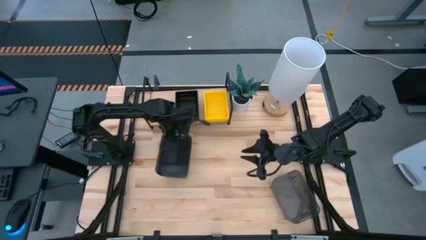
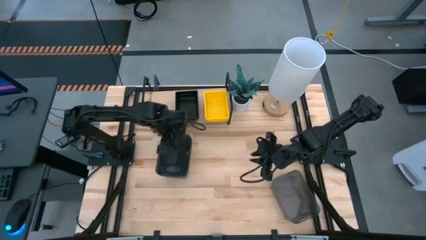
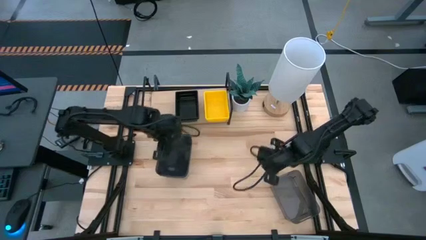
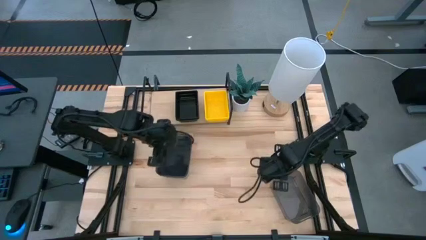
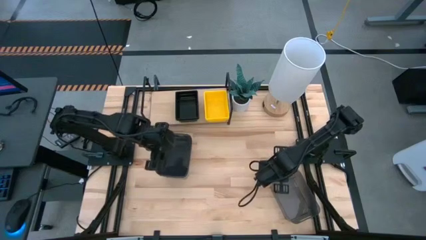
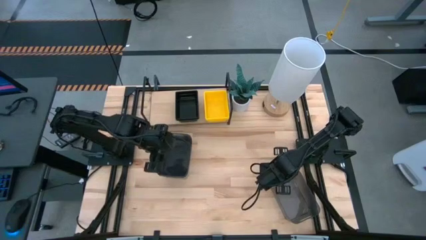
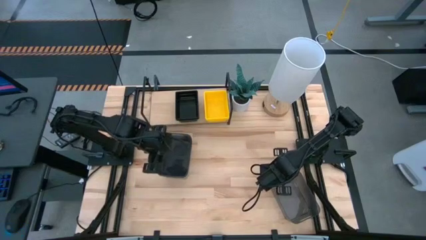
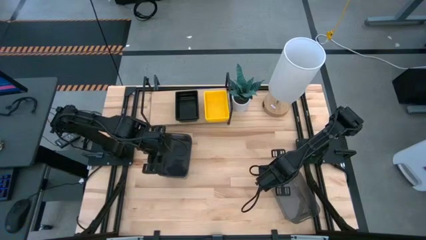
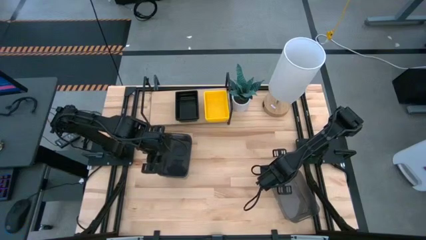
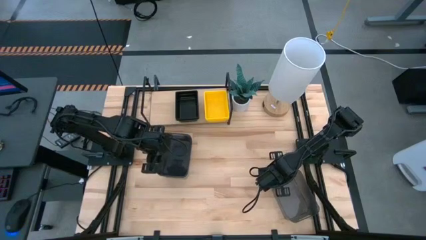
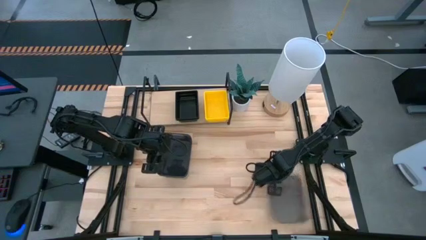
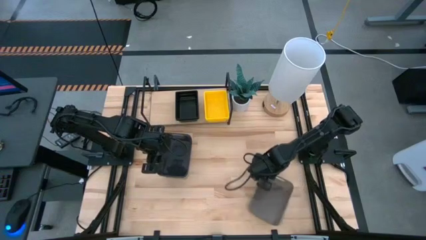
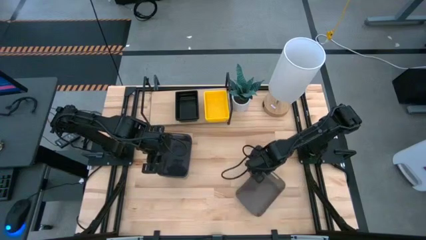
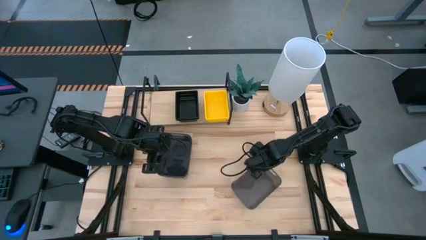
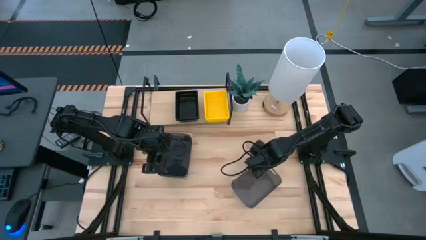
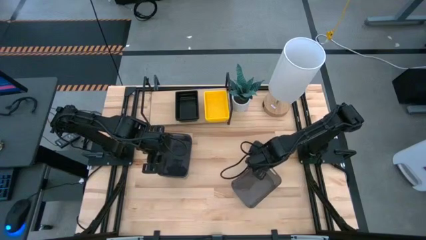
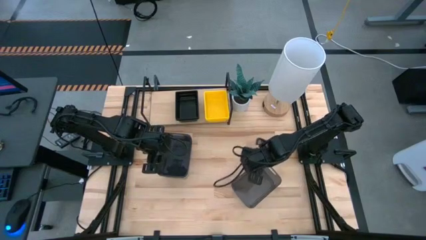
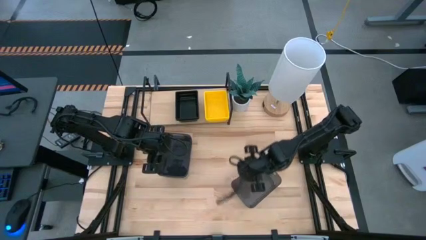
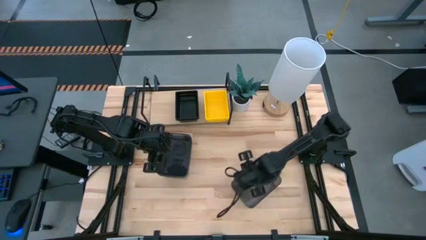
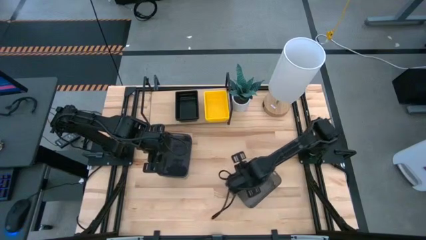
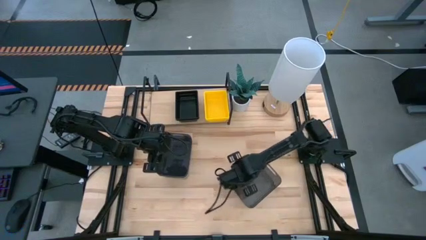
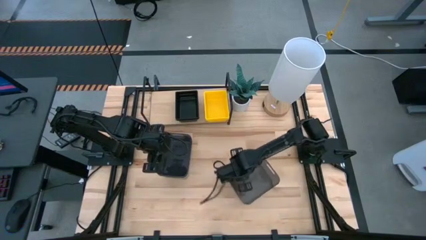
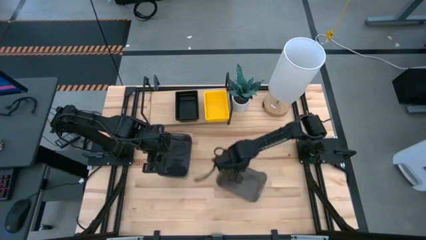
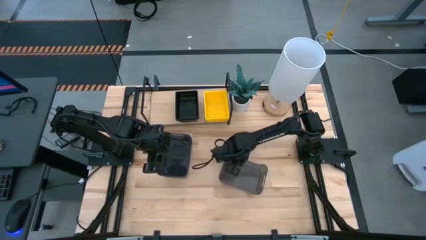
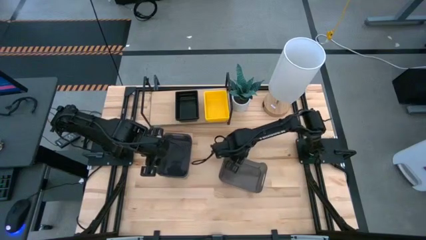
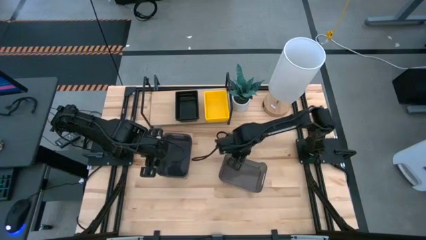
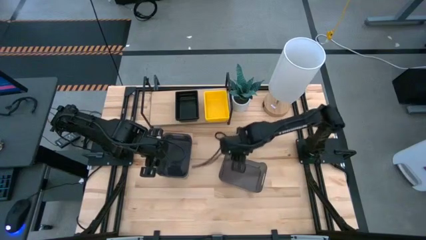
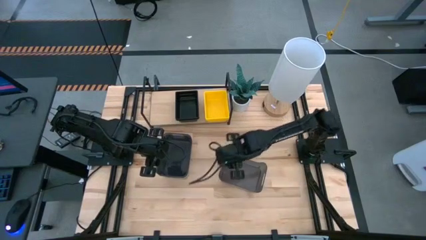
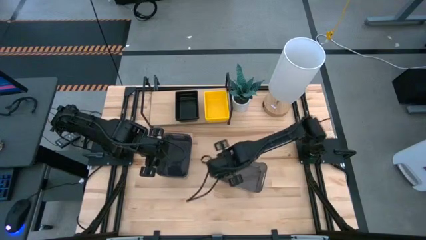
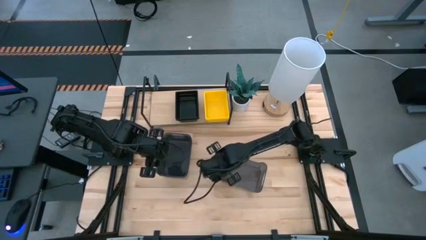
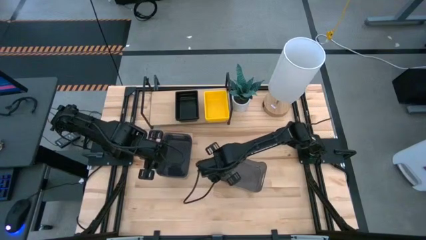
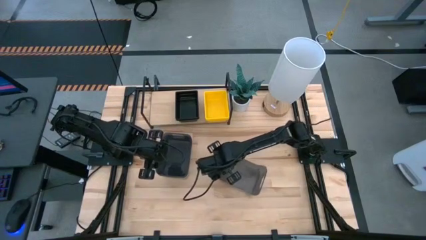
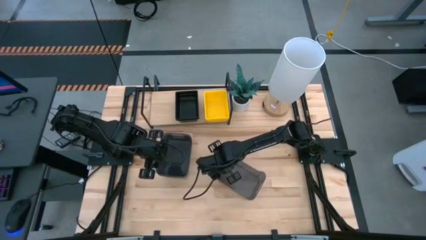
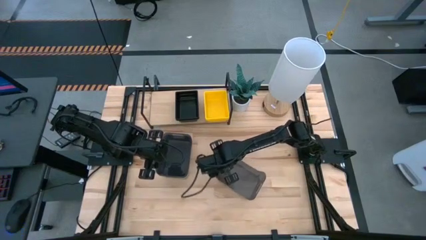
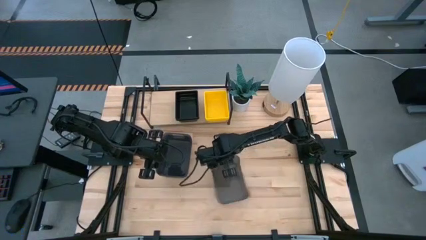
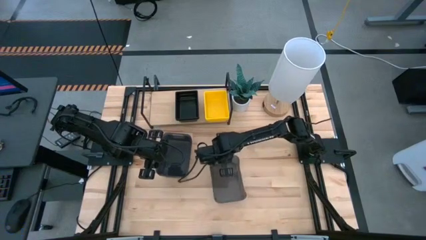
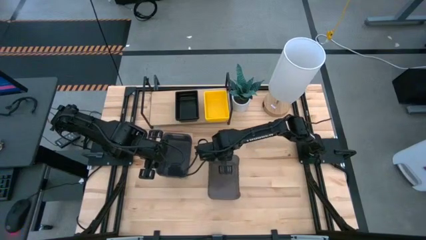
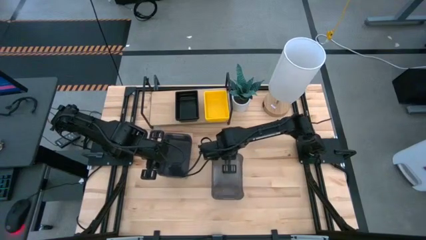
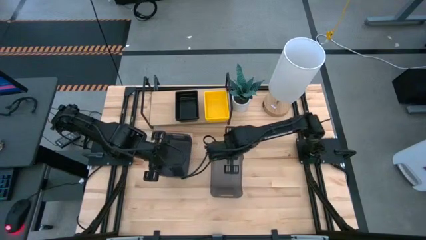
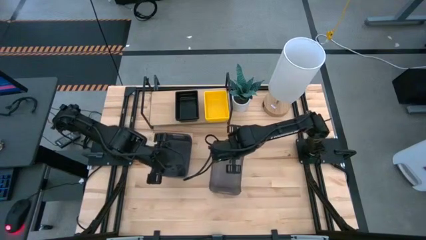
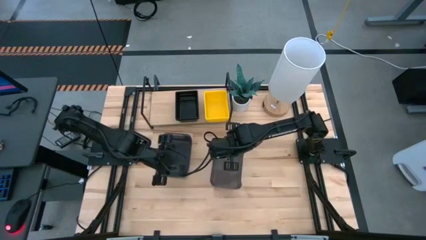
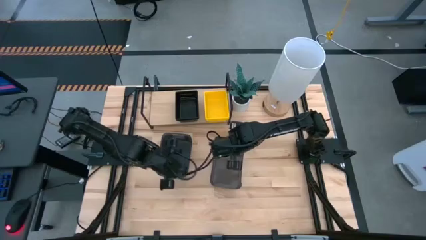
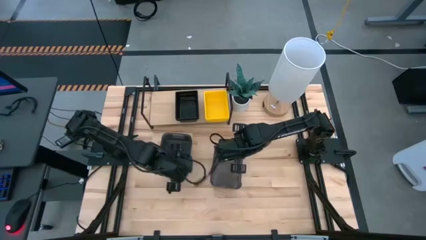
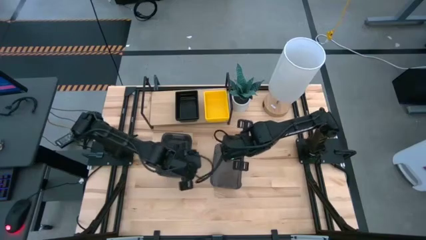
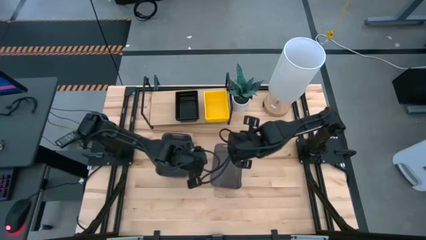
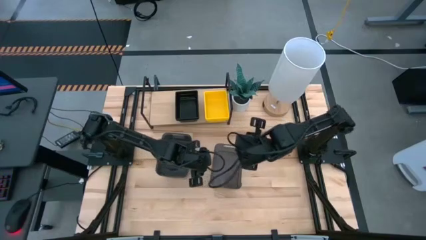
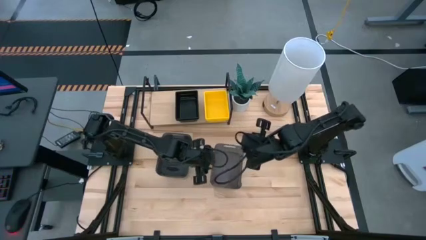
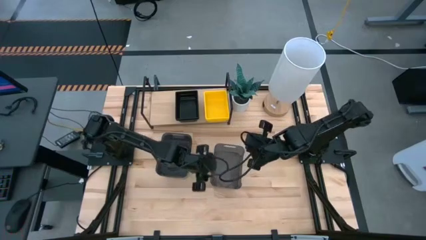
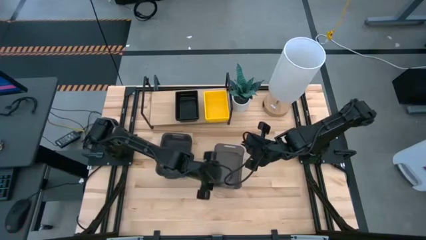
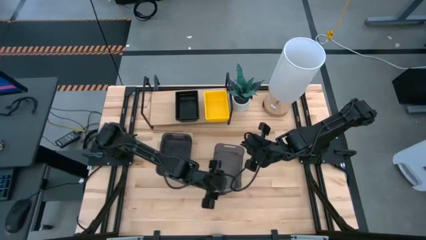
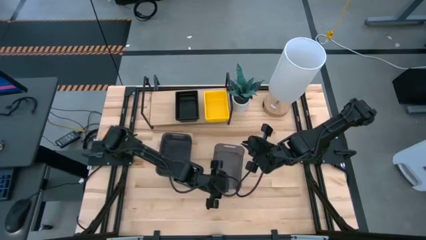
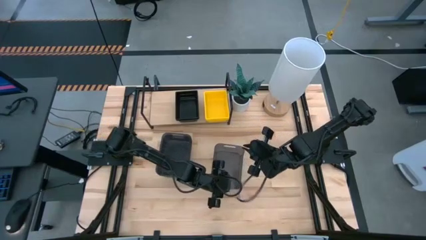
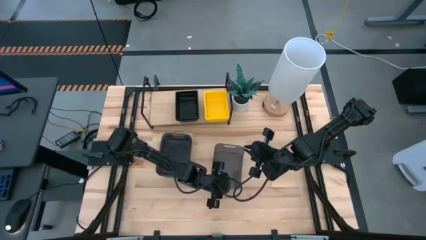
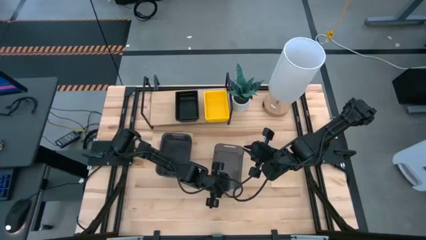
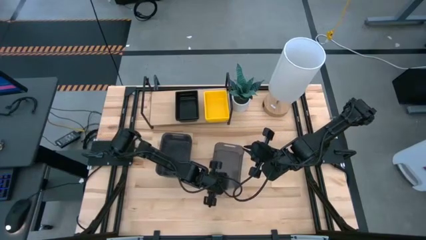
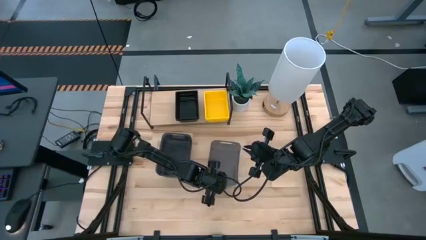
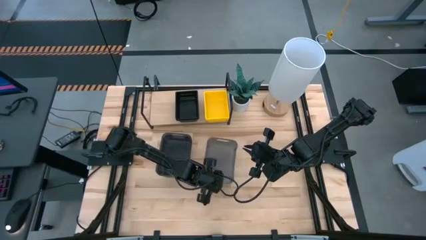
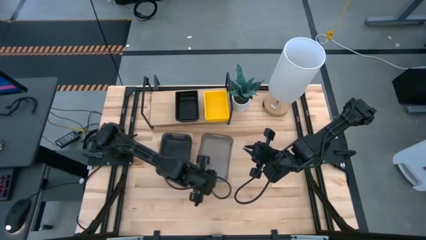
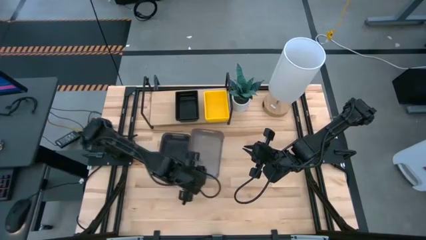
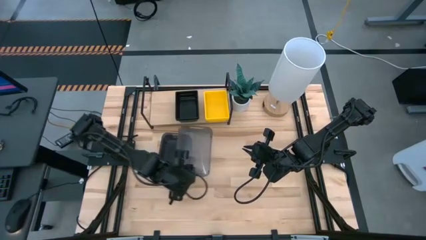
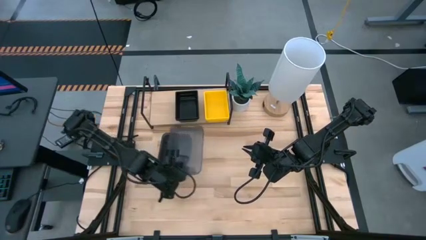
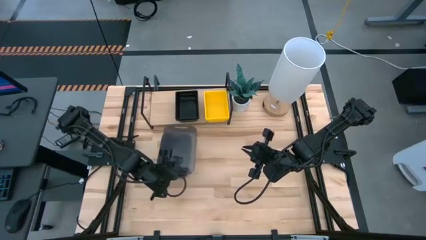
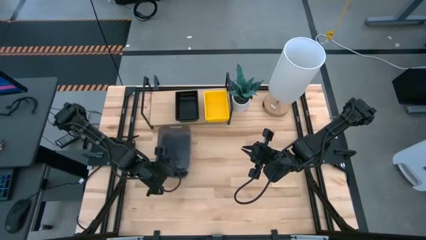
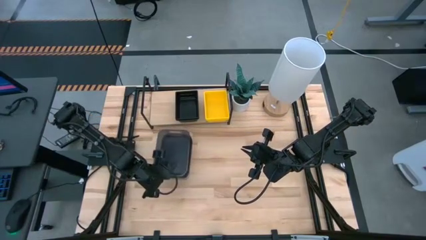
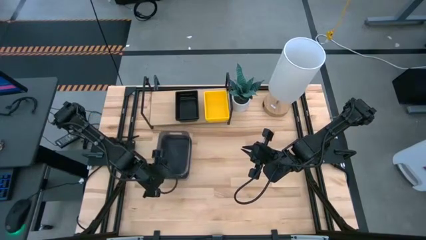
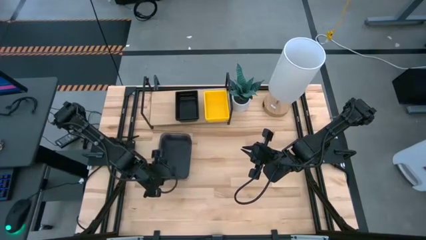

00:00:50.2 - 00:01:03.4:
Task: Stack baskets on shelf by color
Stack the bottom black bin on top of the top black bins

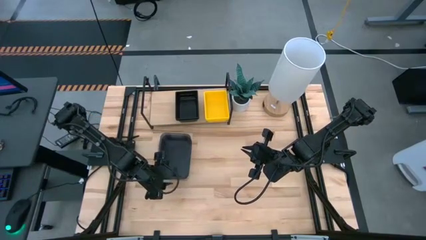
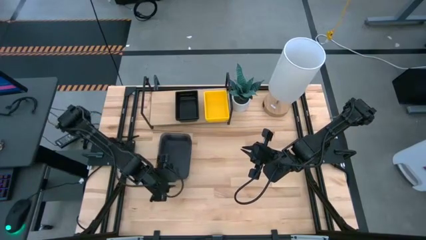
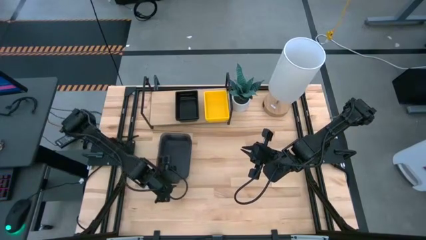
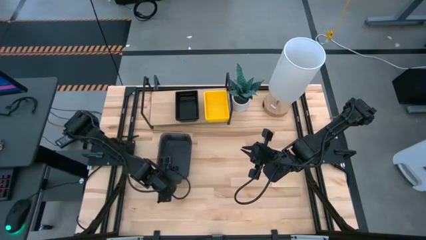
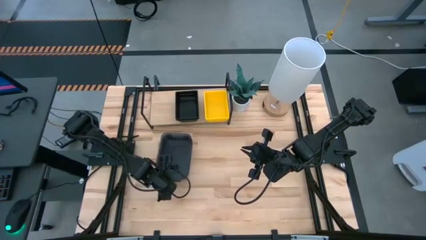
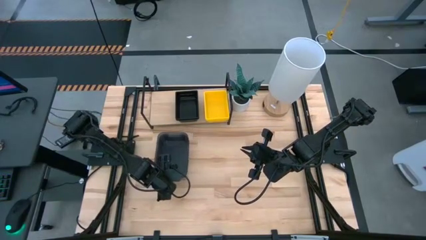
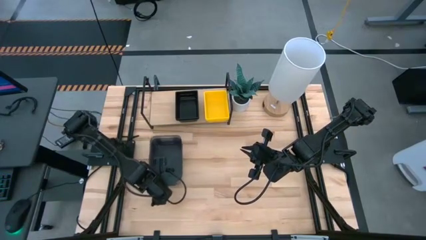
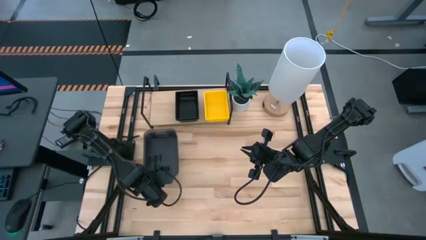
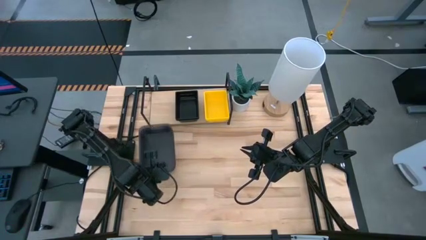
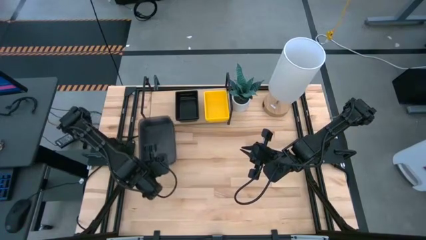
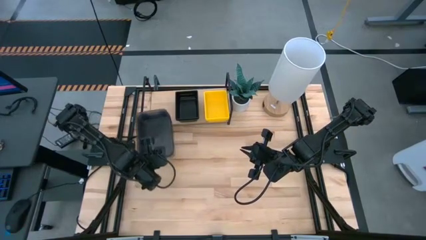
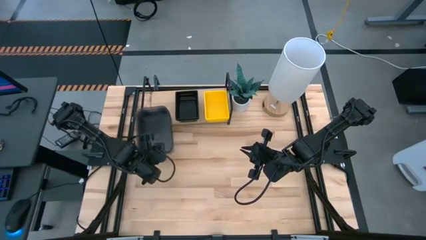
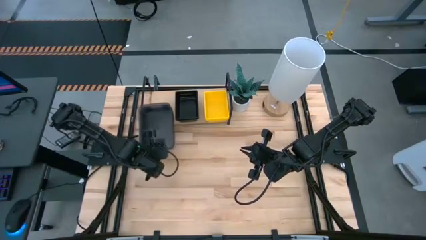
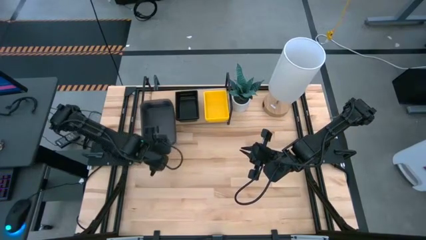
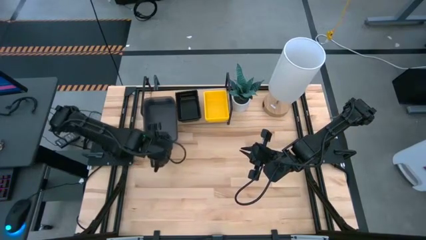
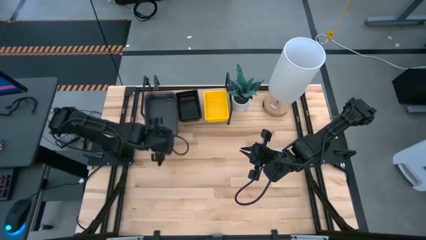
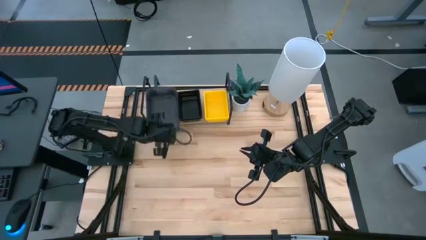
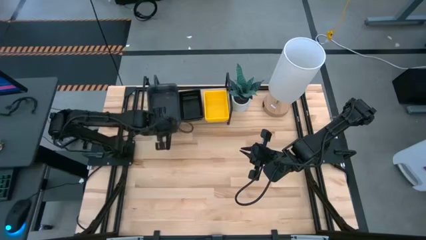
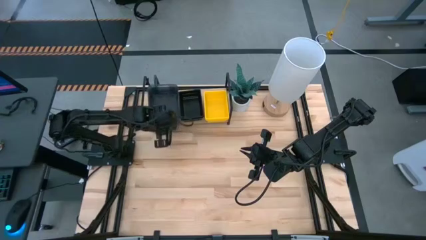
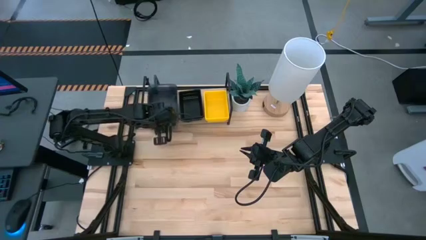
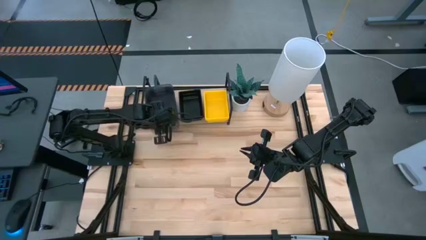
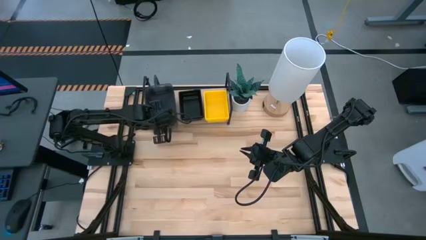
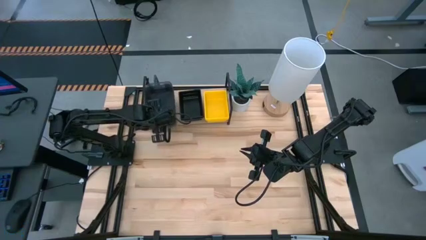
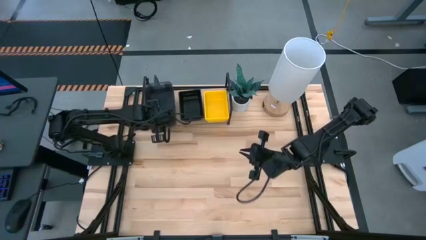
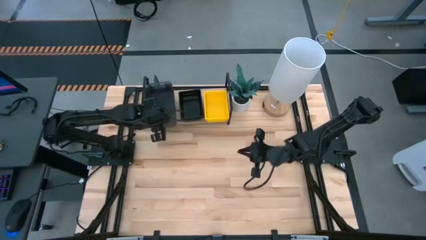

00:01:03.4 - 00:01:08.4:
Put the stacked black bins on the shelf
